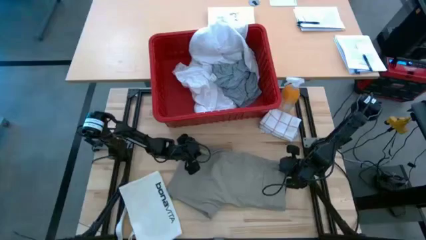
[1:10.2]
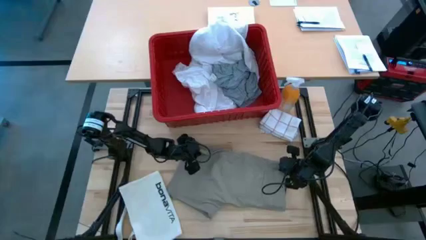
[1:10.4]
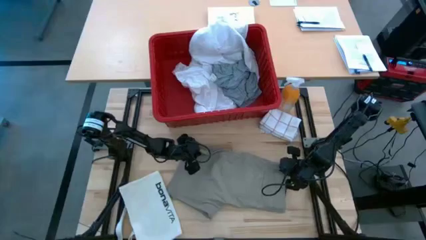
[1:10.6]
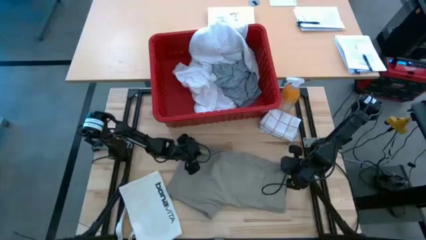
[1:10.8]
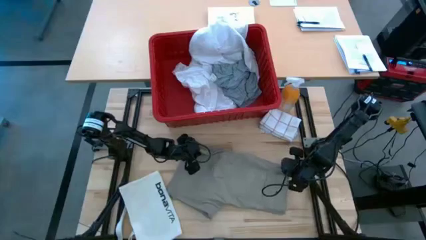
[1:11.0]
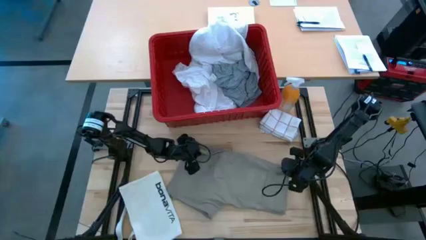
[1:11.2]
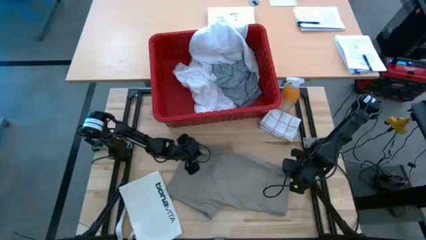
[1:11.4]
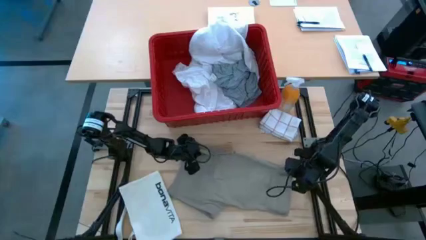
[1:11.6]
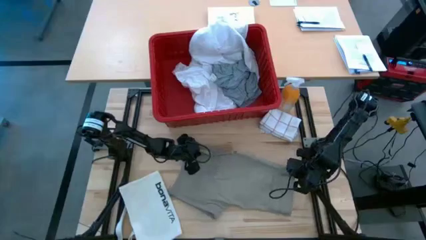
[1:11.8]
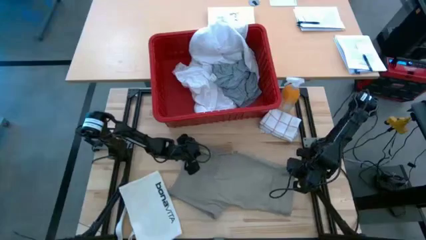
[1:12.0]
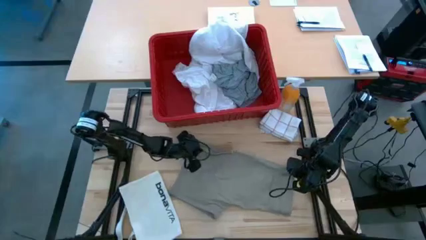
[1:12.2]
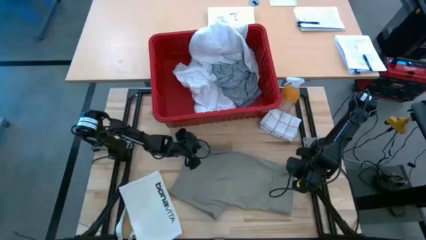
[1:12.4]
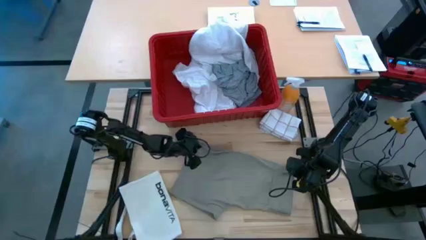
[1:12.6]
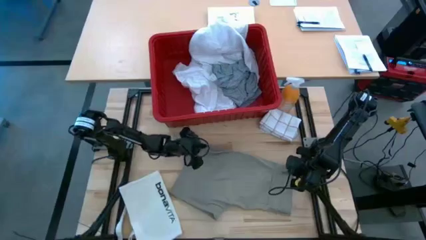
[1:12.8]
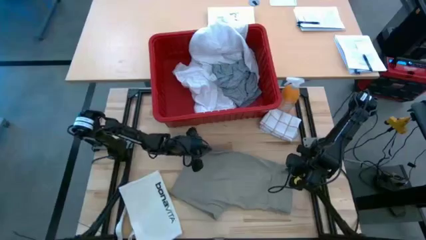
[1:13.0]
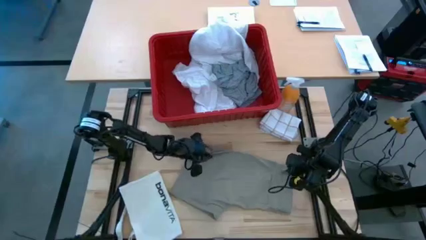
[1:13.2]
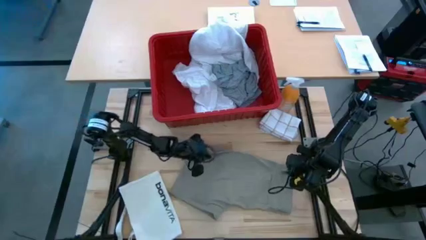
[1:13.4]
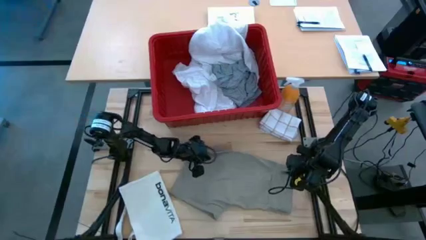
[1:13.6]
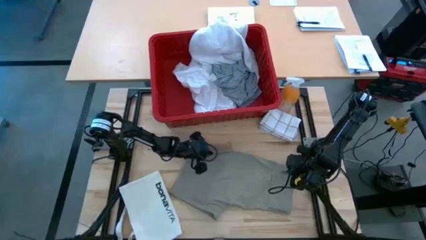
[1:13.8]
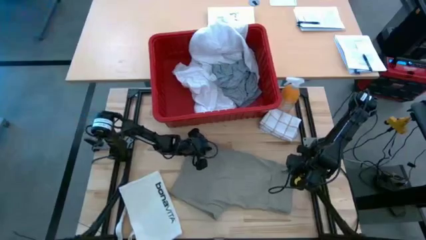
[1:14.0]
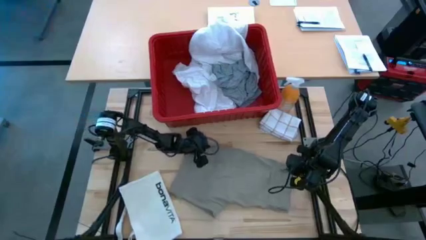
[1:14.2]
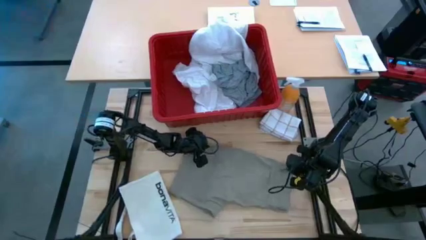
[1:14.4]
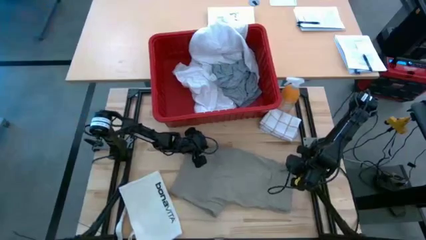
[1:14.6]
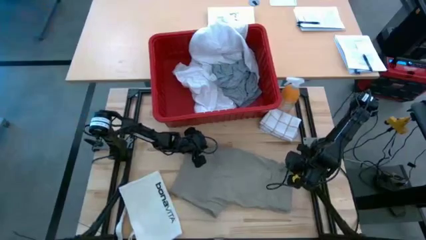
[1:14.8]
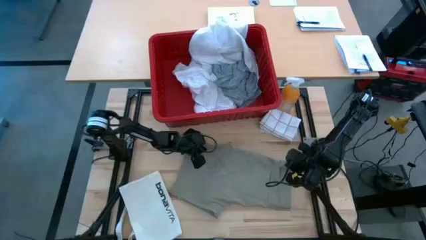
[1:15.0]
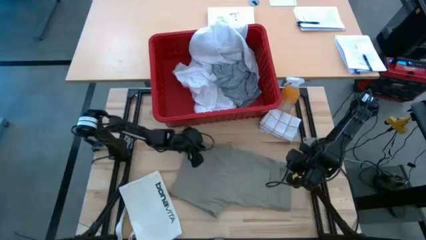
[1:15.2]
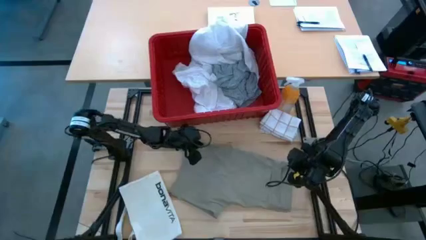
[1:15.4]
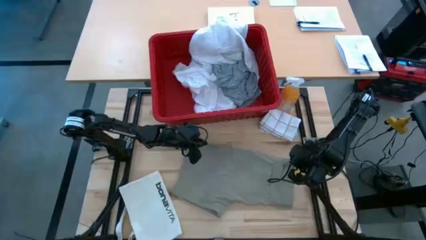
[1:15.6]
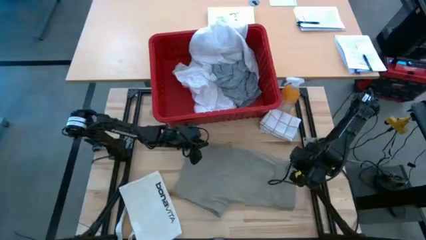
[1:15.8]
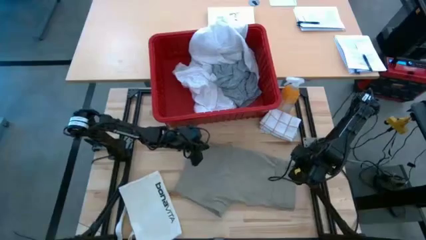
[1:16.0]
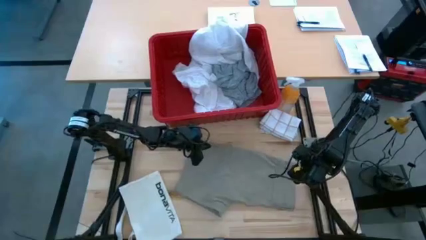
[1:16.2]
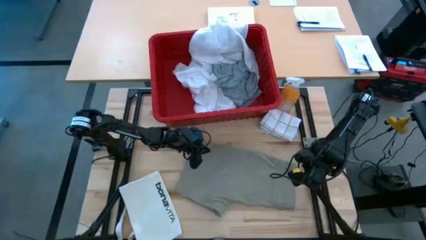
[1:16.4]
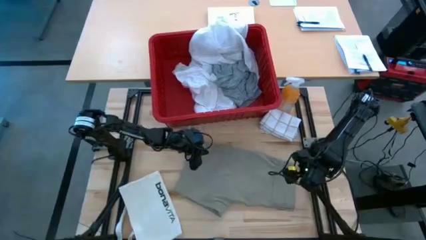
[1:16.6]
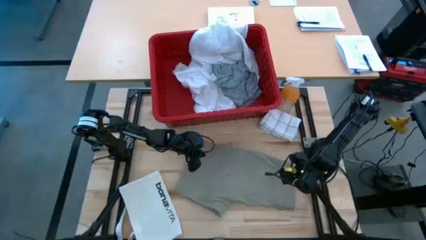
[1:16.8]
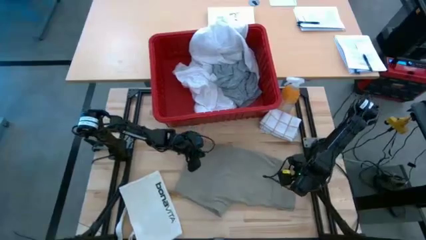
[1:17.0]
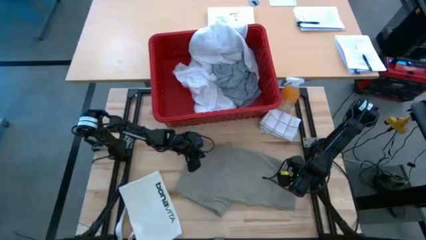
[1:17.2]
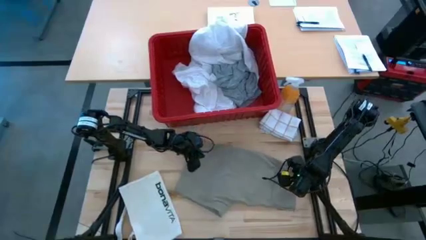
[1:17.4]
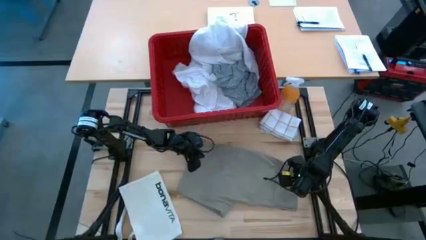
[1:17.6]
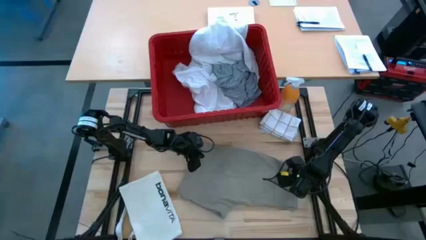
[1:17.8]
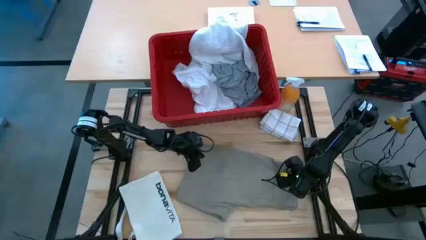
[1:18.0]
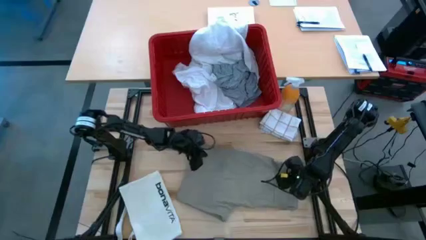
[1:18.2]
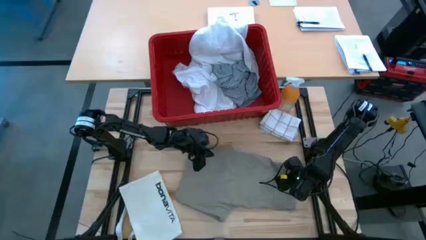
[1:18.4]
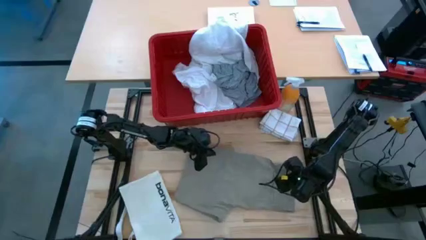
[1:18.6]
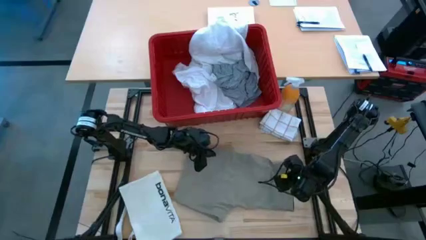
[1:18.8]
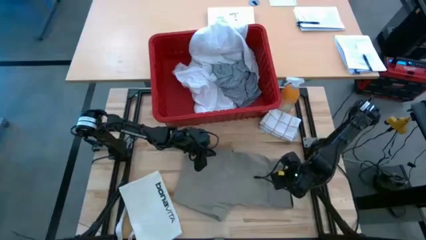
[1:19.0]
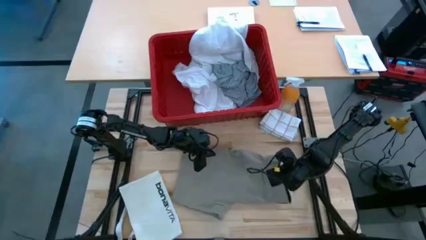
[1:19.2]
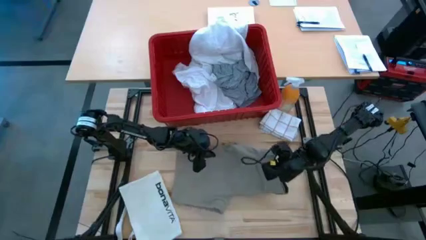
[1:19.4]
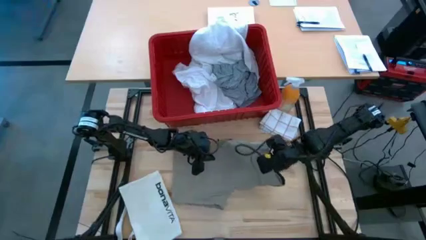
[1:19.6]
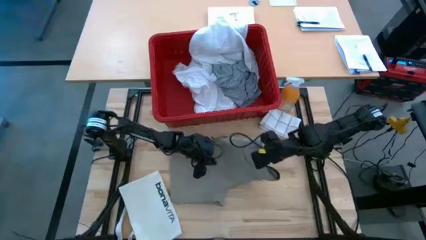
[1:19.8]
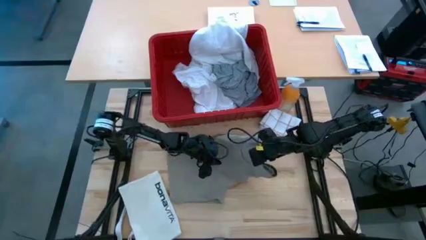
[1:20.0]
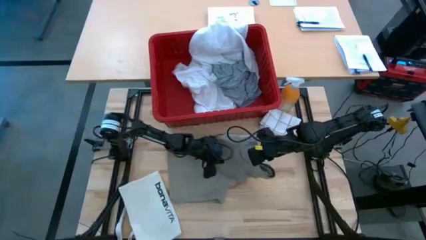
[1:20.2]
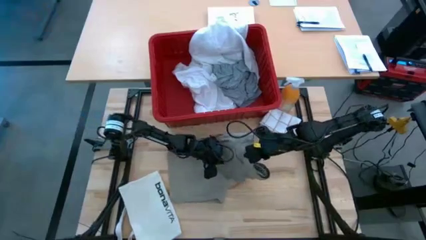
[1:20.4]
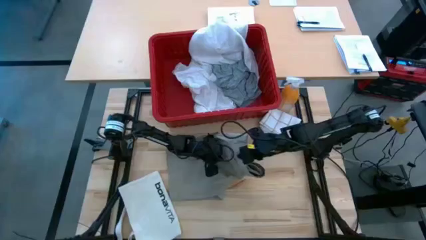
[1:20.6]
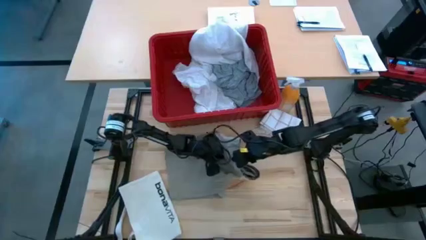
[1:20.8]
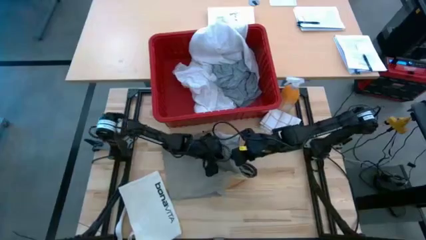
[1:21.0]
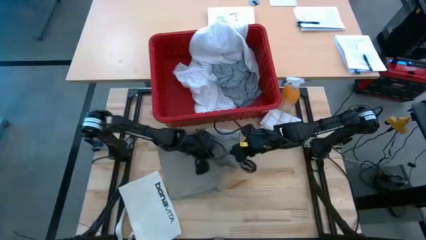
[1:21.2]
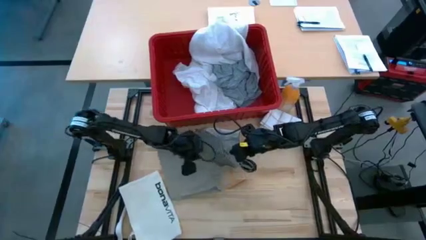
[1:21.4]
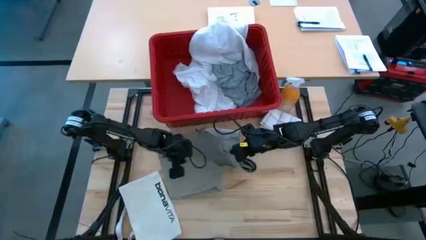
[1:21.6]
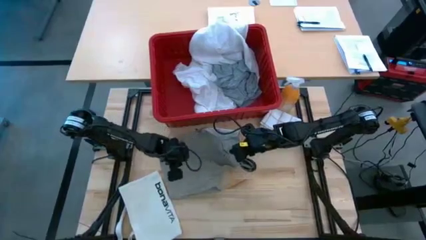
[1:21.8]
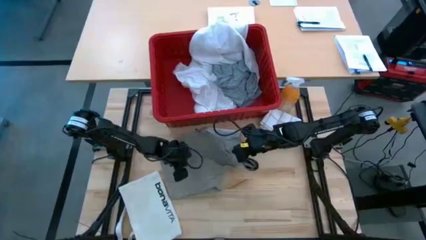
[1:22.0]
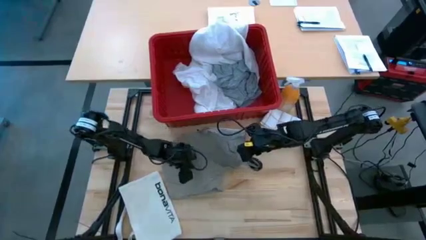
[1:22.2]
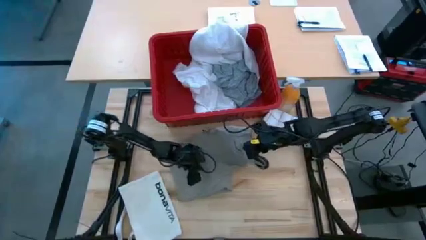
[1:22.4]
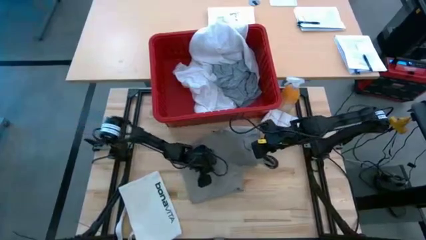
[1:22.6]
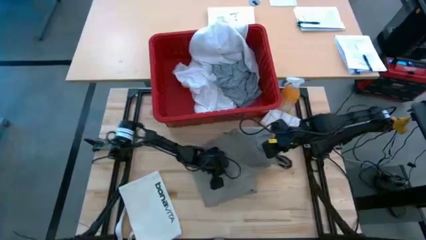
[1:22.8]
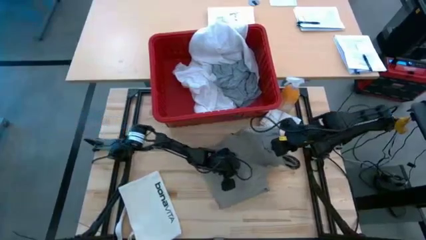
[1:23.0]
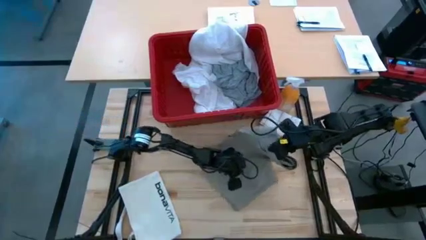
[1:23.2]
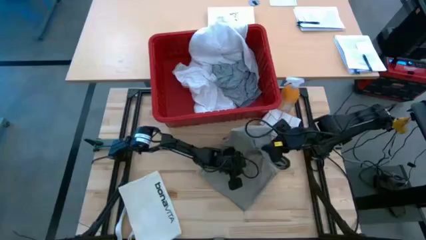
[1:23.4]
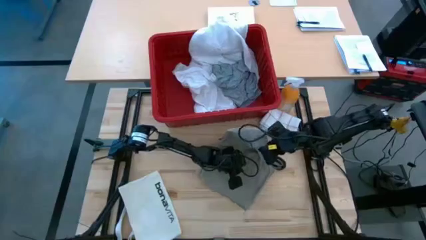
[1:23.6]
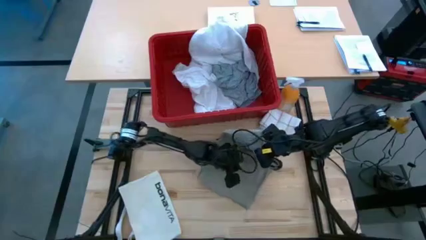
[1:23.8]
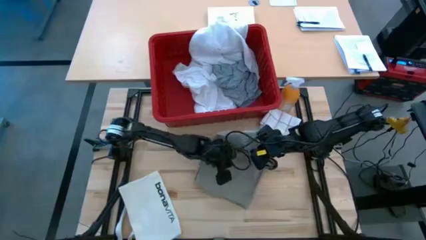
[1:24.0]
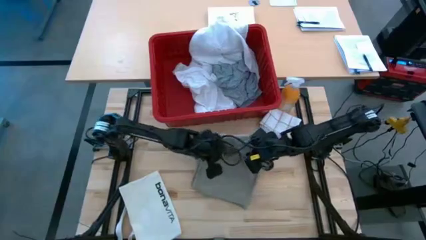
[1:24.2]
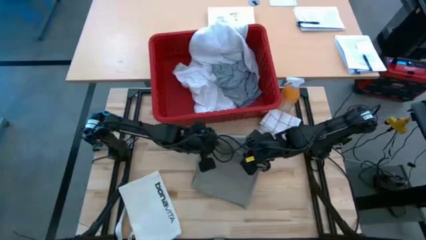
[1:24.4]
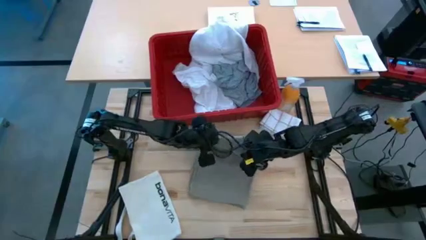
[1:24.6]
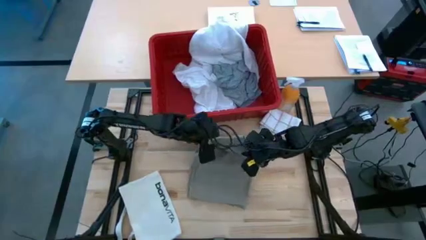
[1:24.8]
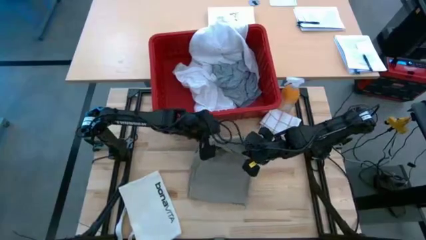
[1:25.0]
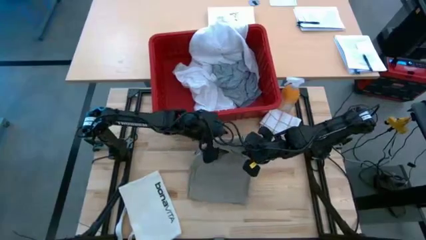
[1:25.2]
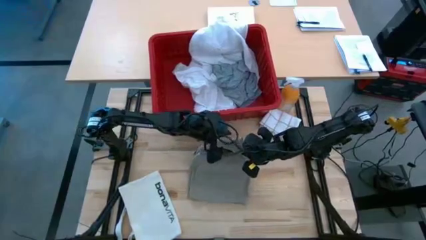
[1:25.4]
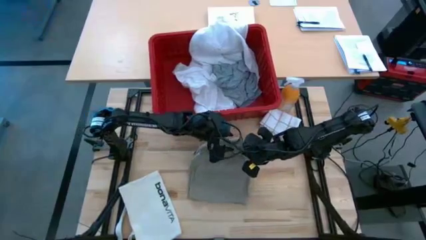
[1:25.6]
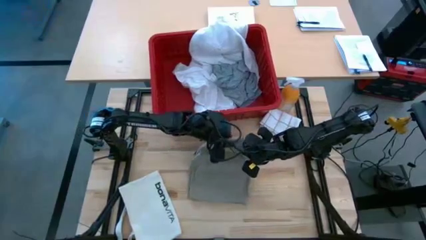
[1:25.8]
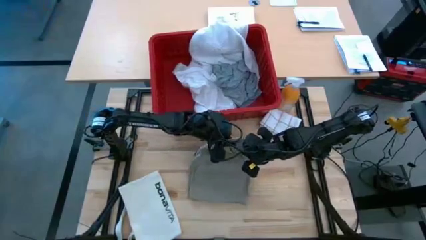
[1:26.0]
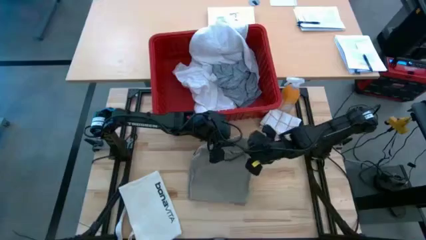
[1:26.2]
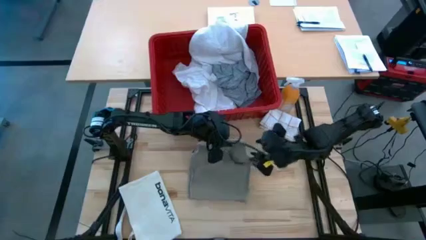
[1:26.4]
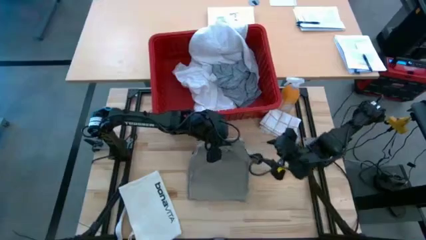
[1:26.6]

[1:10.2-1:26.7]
Task: Fold laundry
Fold the brown shorts
